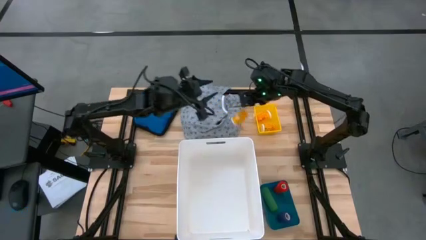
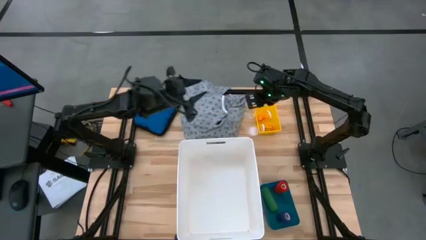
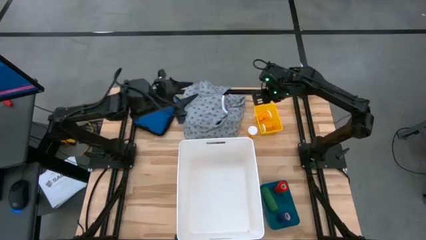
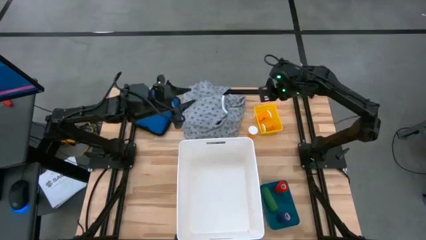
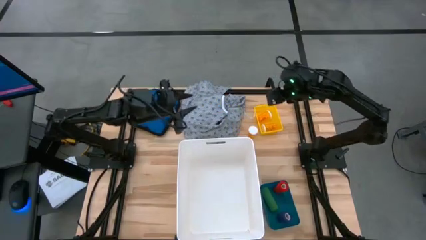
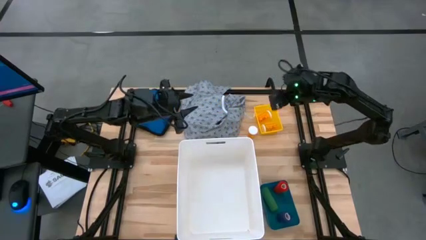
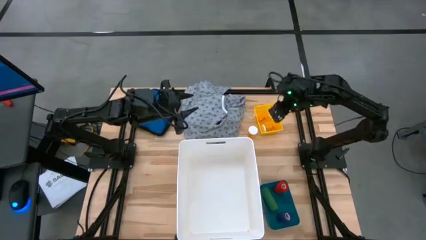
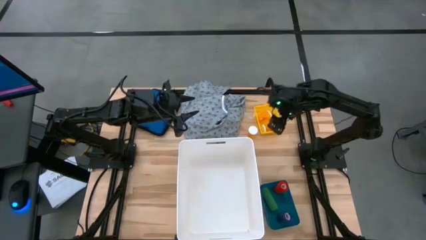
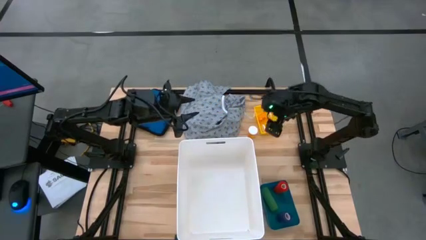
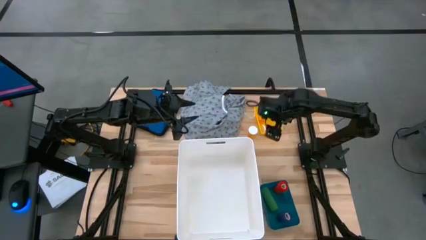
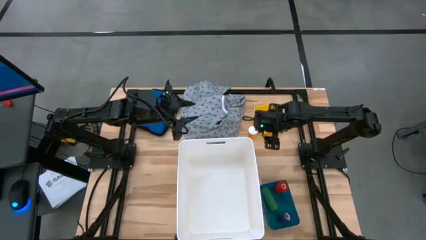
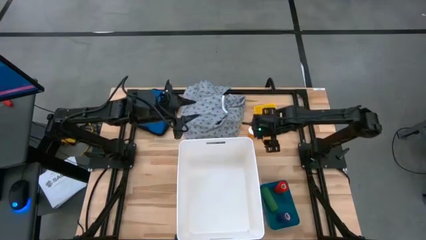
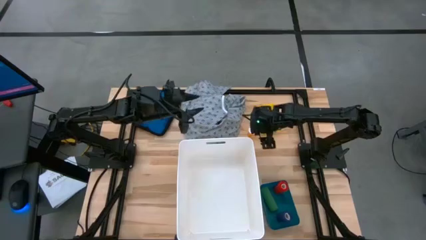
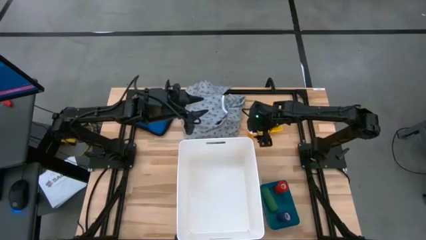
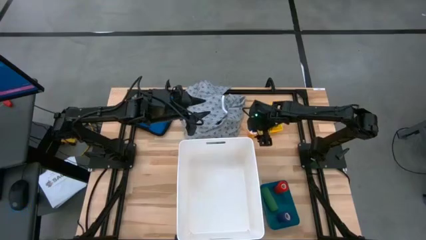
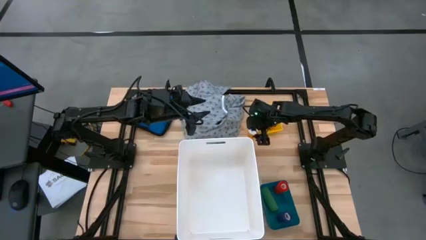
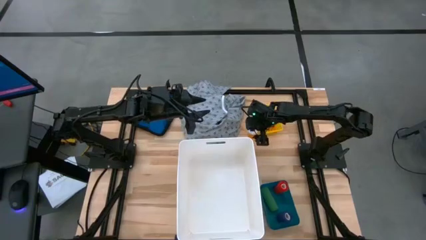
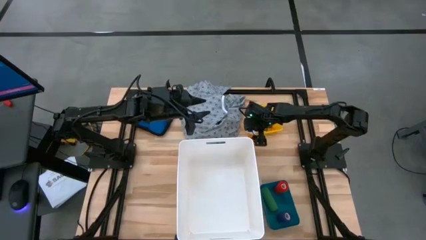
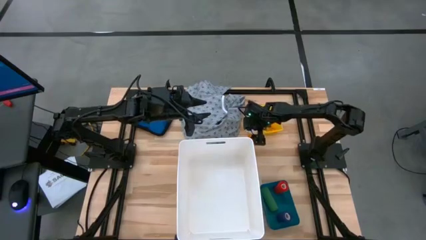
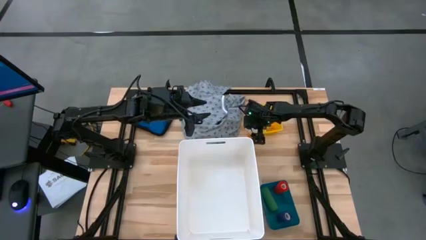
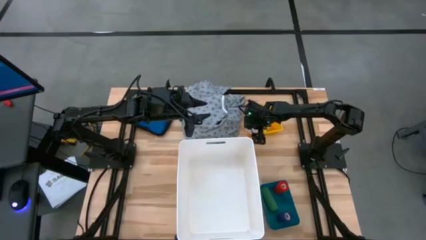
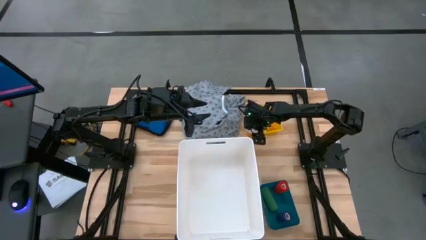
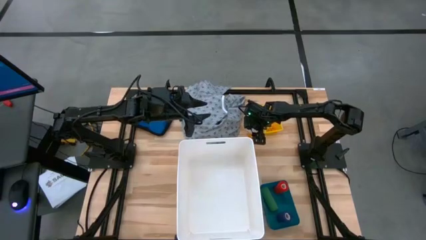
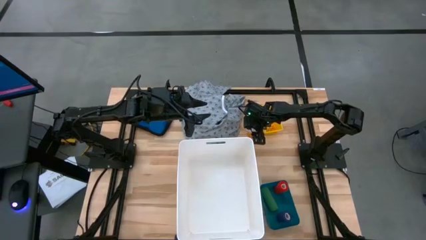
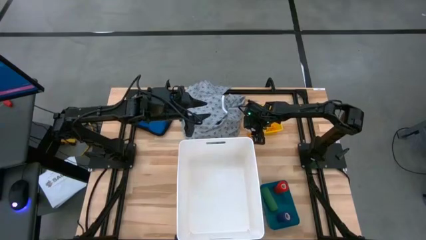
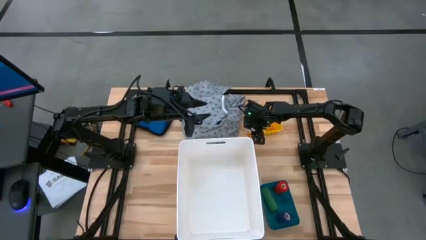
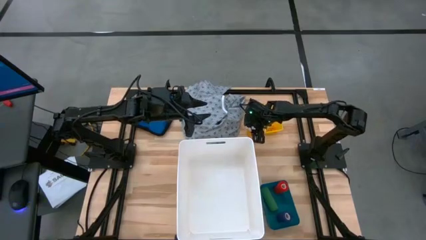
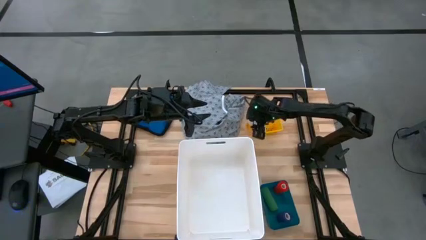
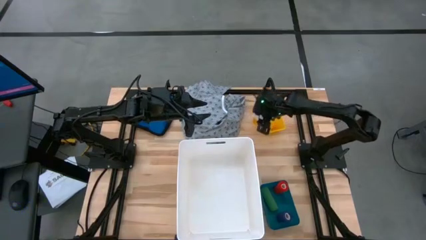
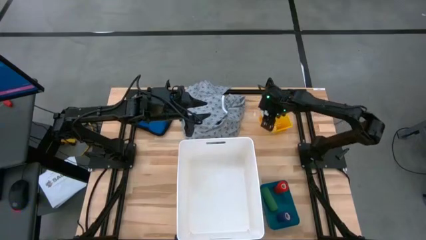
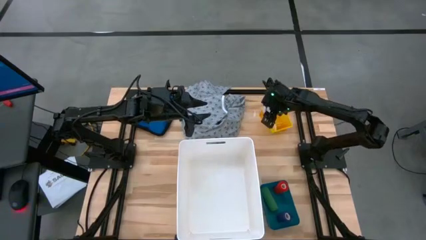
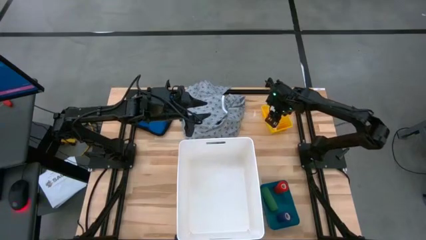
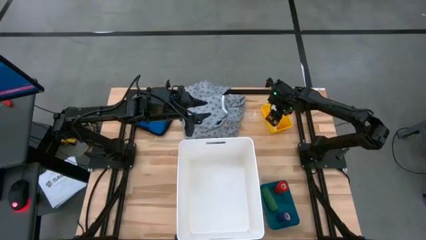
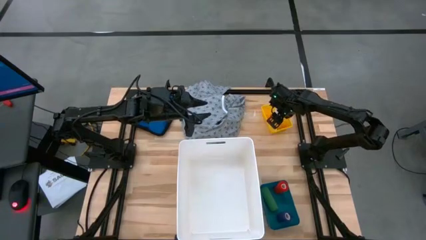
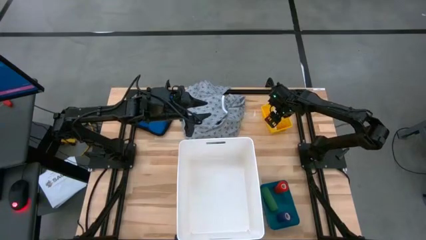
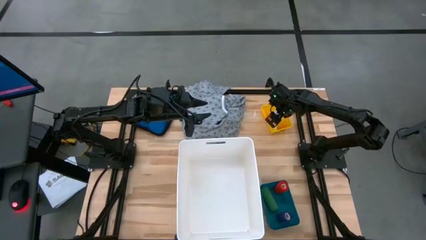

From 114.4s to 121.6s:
Task: Pick & place medical supplies in basket/bin
Put the orange pill bottle into the yellow bin

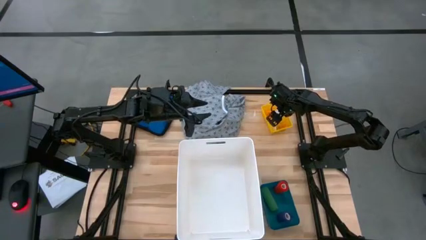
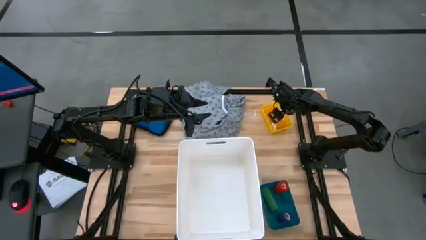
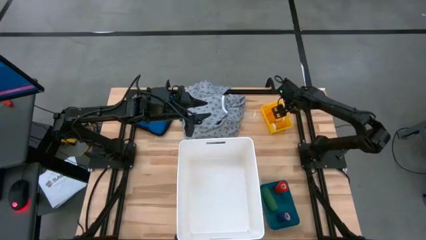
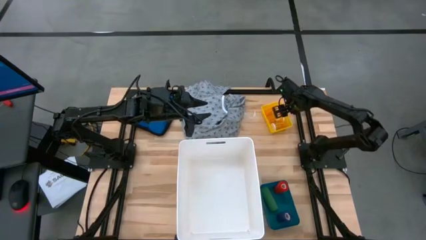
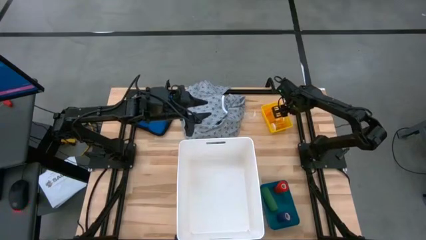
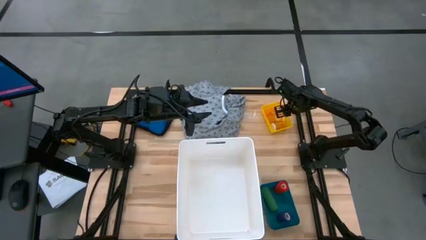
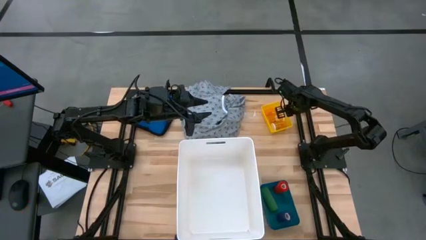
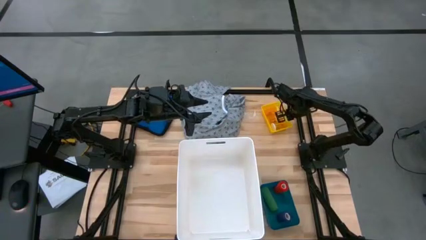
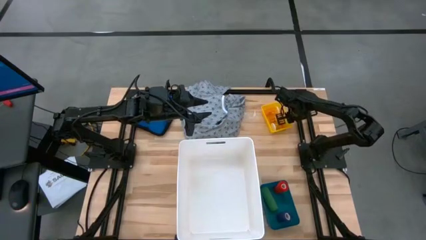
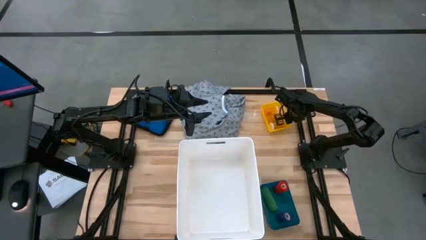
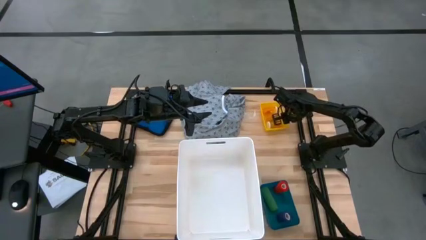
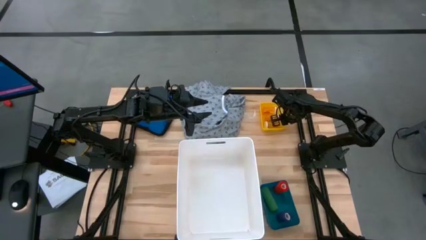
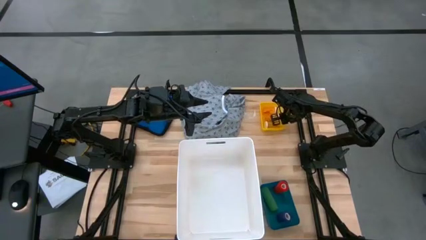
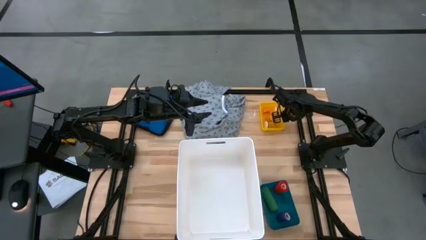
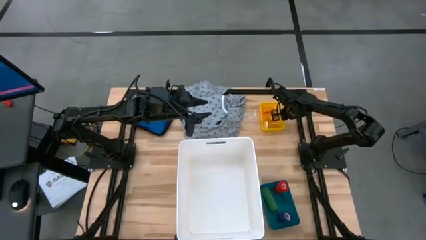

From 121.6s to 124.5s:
Adjust the yellow bin

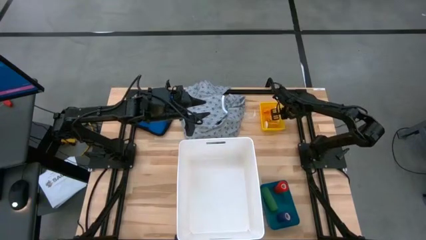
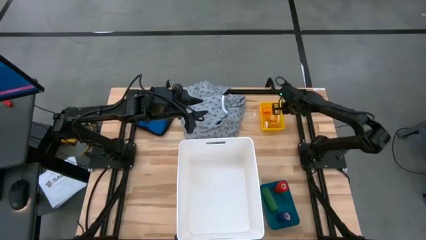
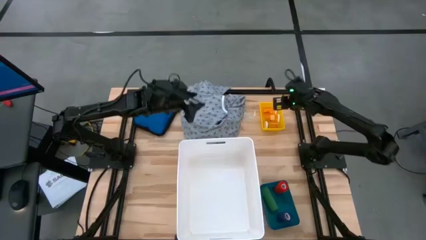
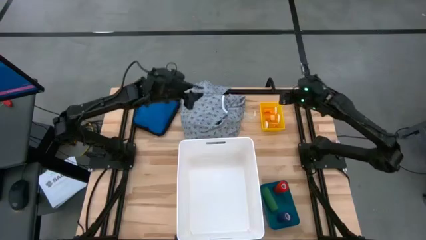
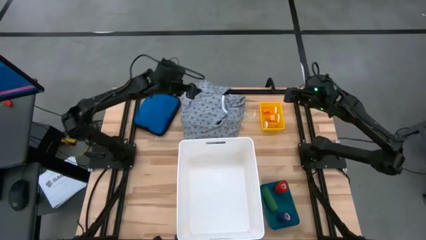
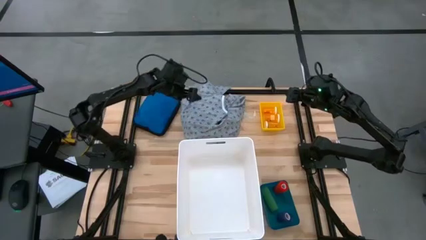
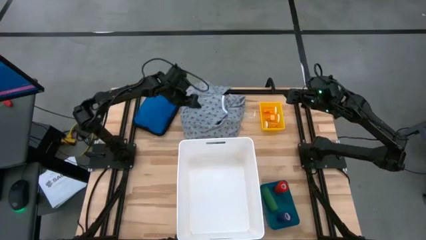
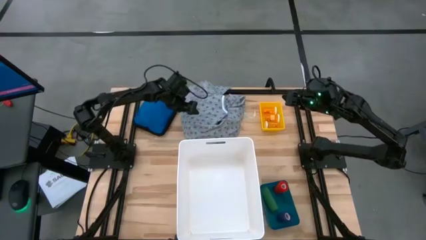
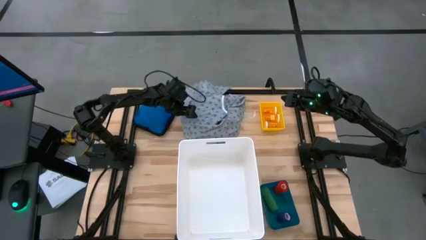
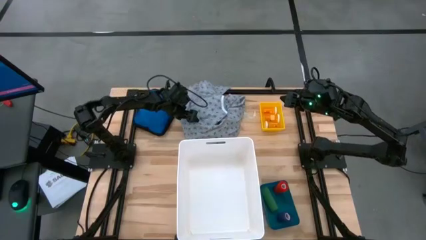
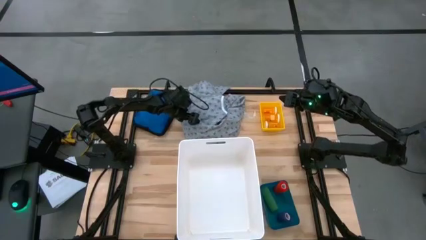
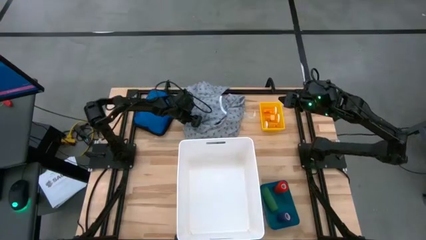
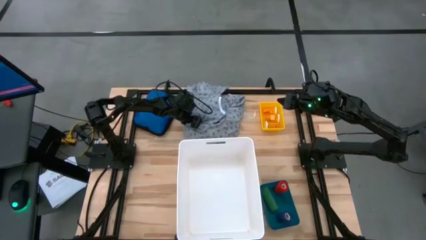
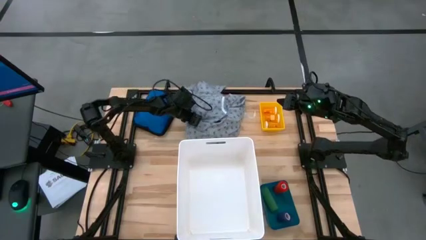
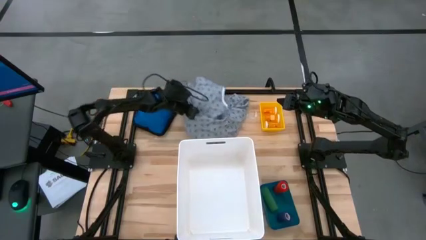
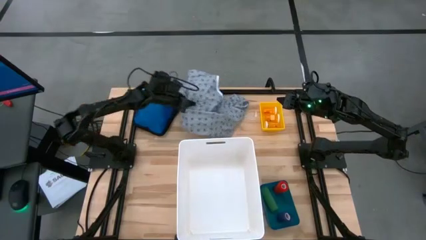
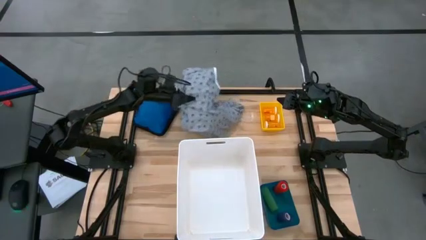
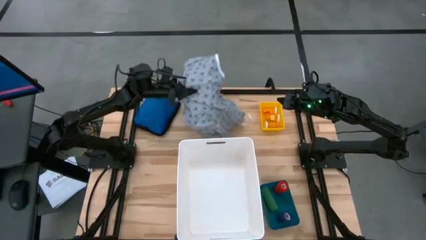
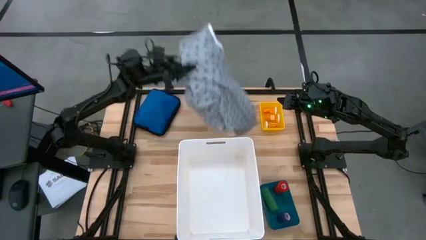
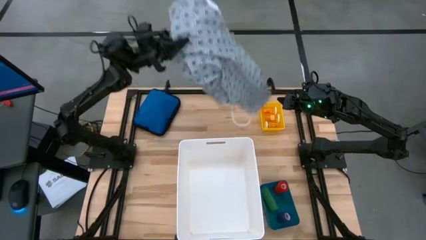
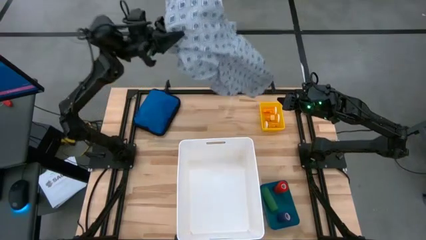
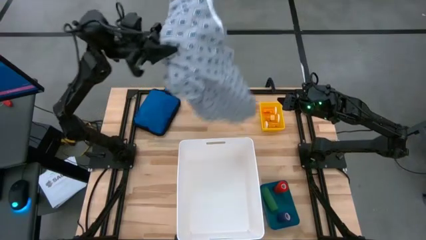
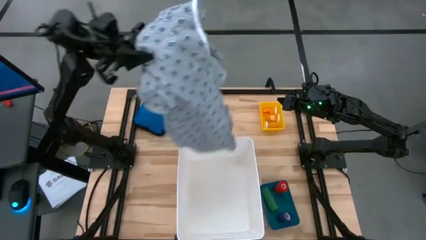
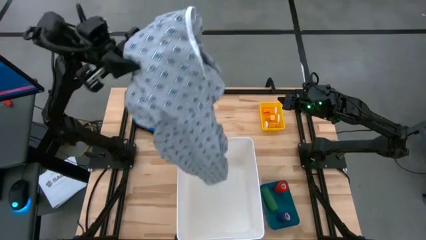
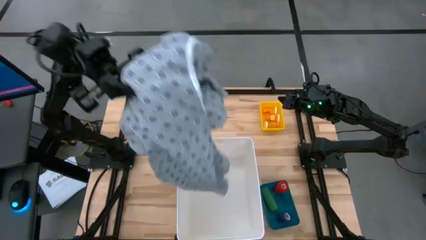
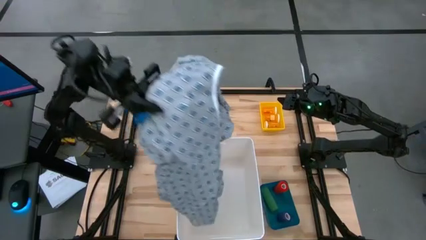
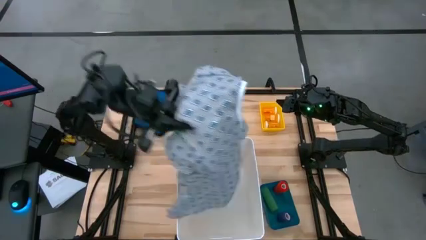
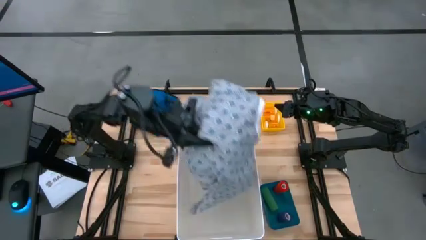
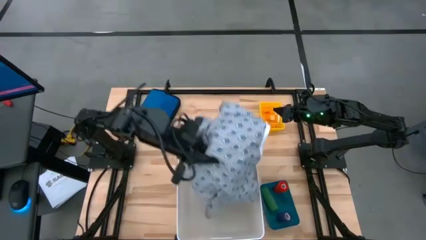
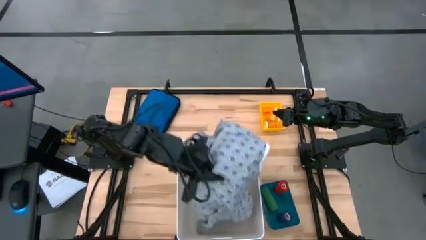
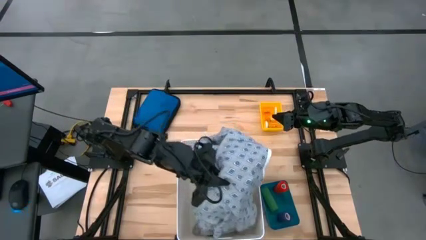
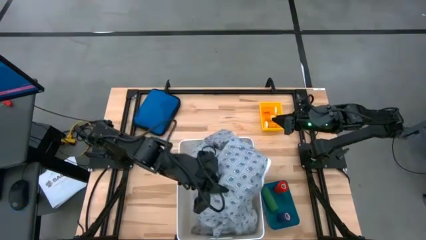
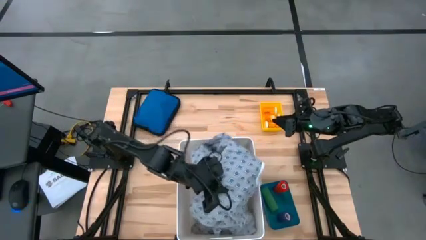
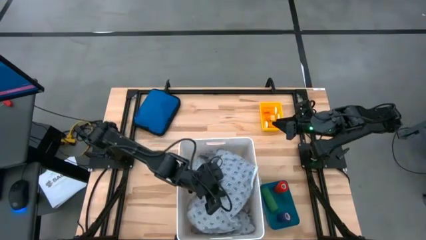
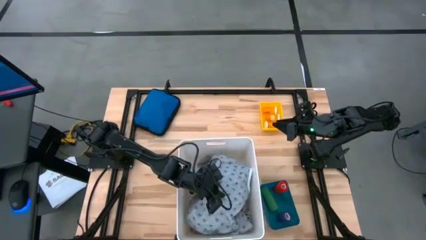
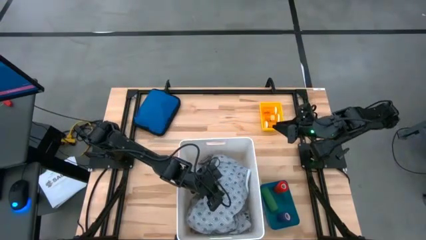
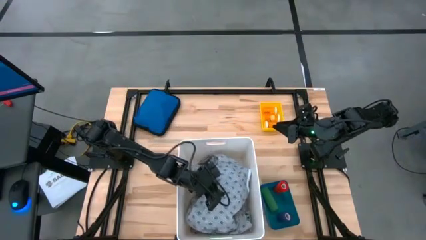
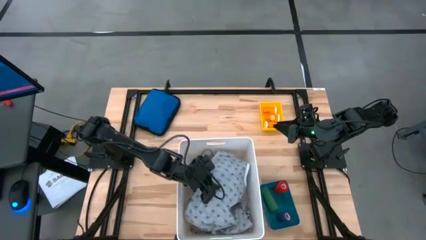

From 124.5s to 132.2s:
Put the gray patterned patient gown into the white laundry bin
